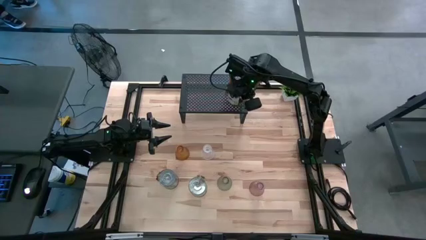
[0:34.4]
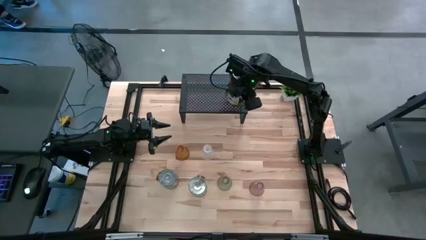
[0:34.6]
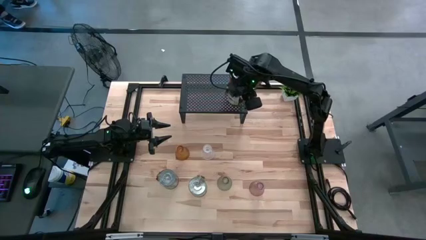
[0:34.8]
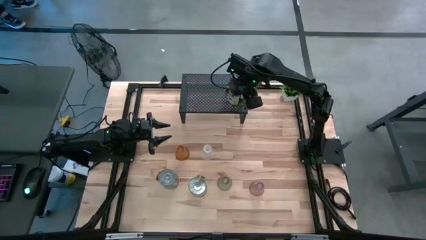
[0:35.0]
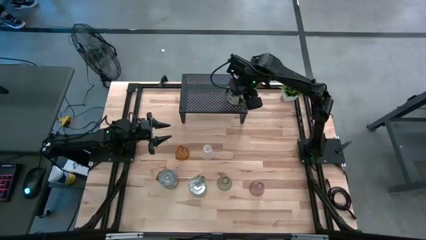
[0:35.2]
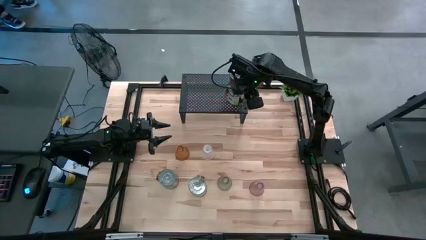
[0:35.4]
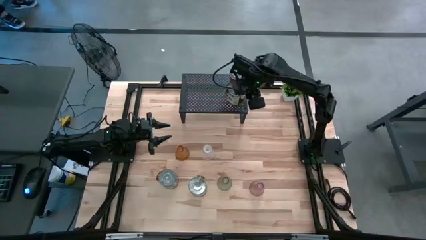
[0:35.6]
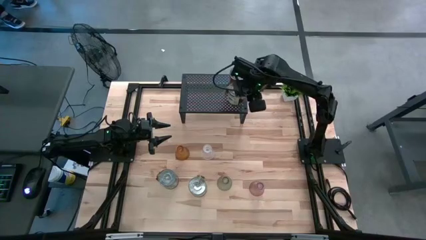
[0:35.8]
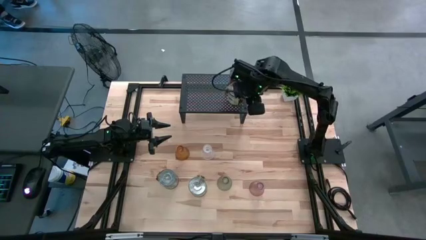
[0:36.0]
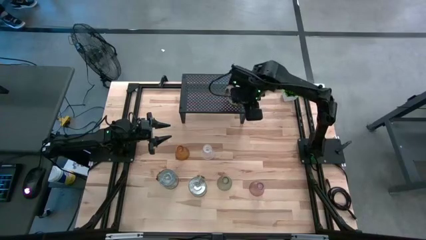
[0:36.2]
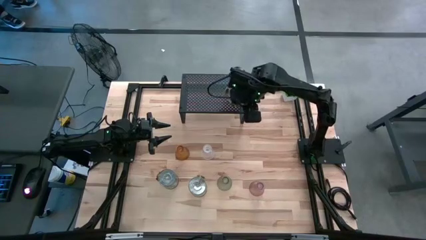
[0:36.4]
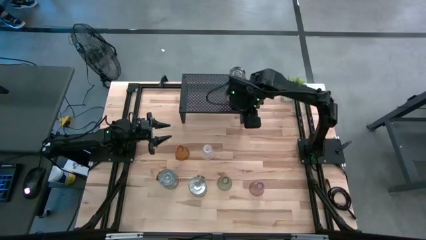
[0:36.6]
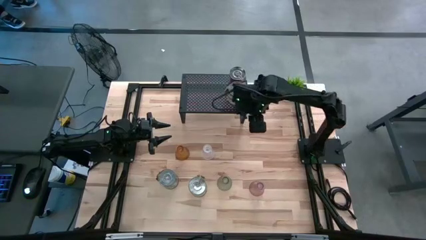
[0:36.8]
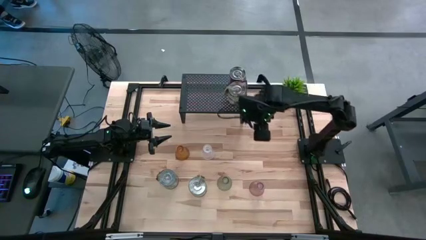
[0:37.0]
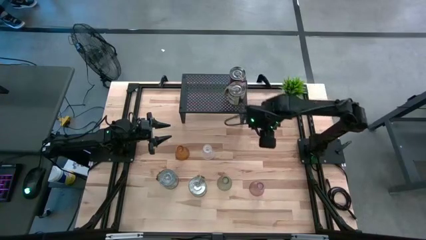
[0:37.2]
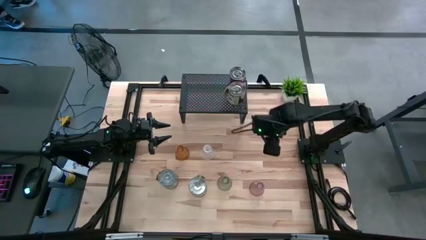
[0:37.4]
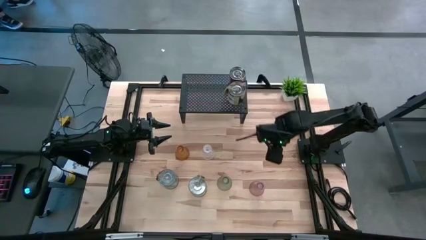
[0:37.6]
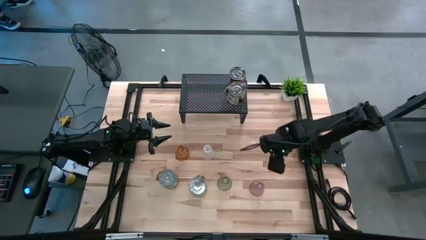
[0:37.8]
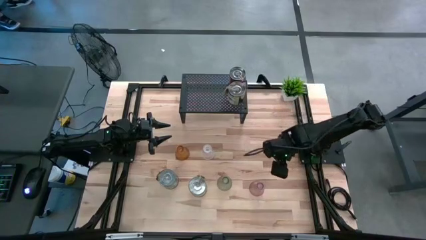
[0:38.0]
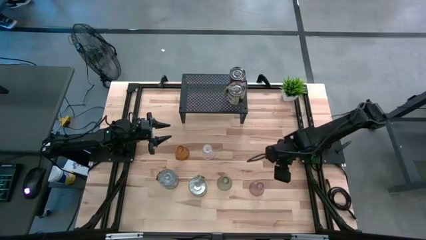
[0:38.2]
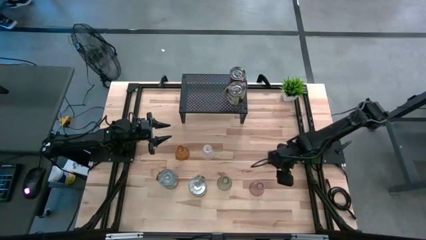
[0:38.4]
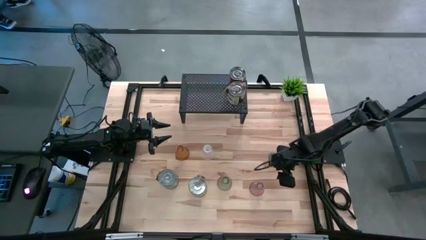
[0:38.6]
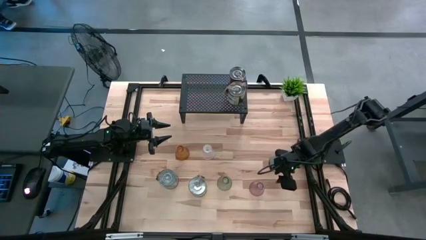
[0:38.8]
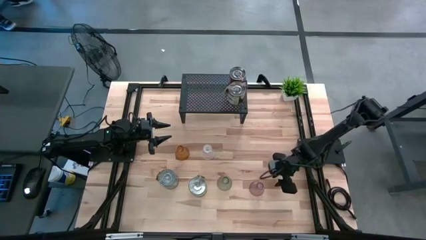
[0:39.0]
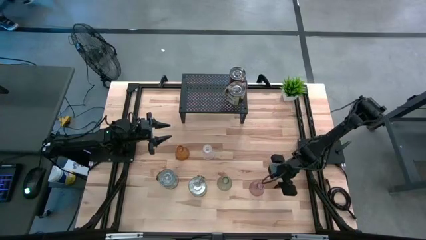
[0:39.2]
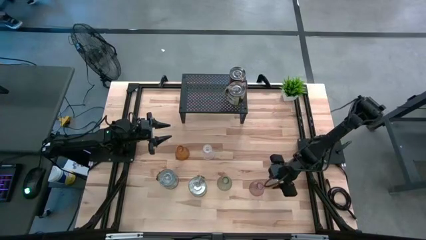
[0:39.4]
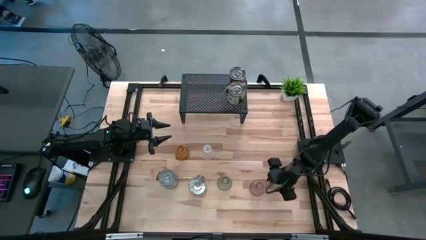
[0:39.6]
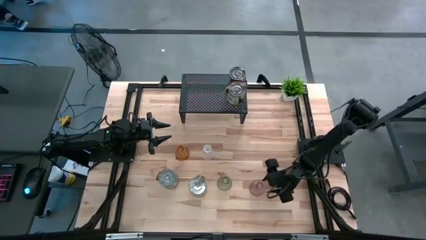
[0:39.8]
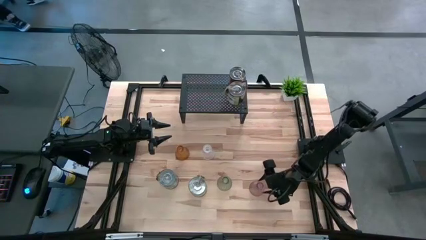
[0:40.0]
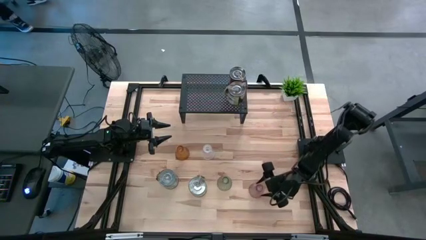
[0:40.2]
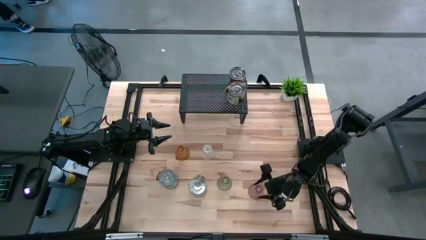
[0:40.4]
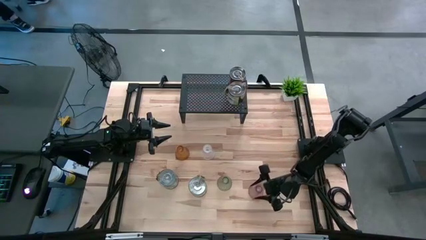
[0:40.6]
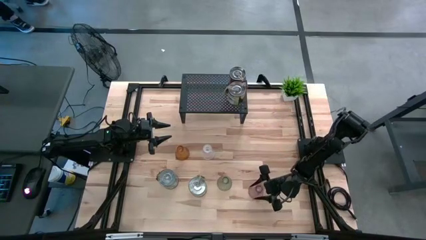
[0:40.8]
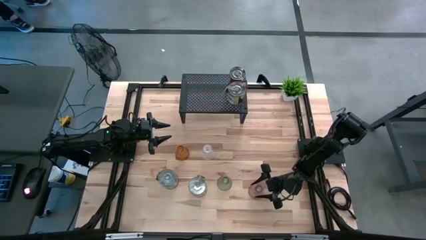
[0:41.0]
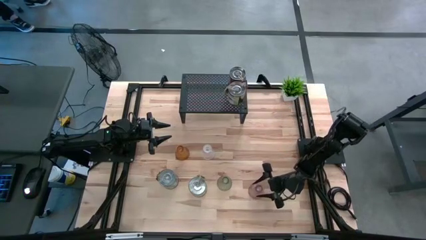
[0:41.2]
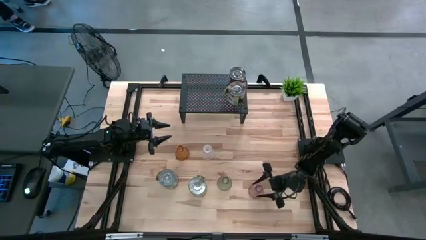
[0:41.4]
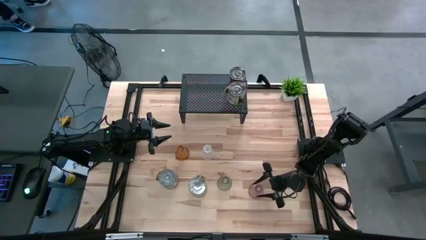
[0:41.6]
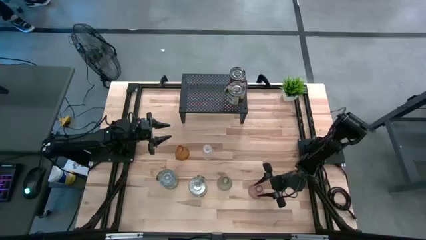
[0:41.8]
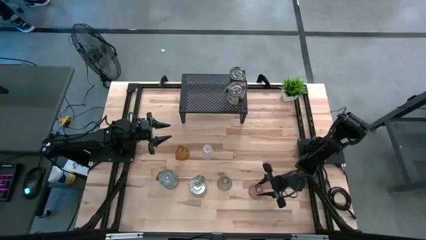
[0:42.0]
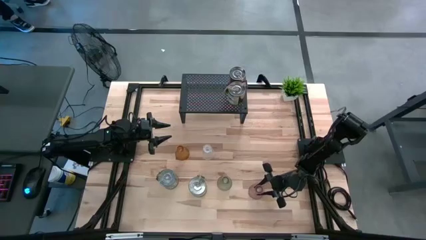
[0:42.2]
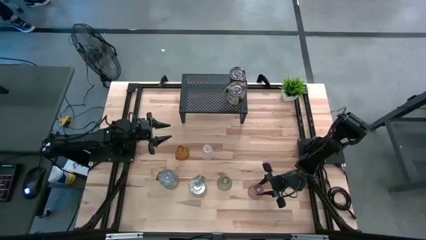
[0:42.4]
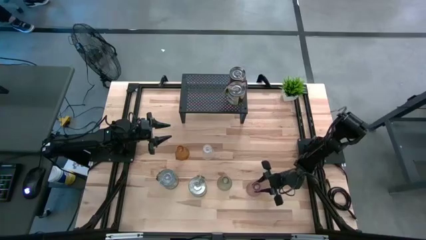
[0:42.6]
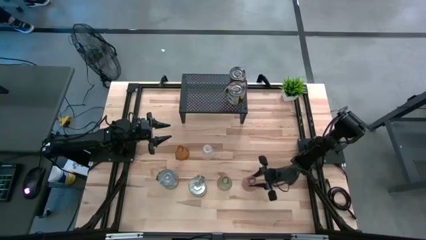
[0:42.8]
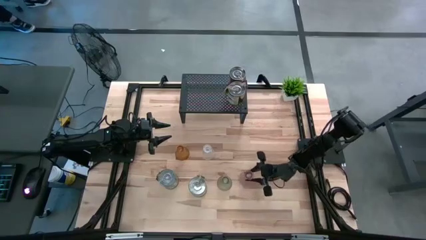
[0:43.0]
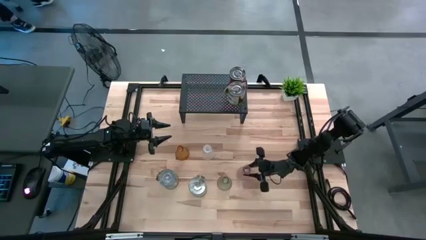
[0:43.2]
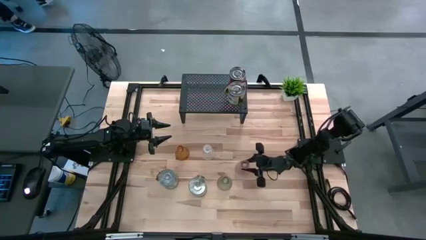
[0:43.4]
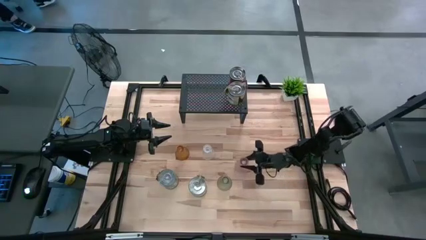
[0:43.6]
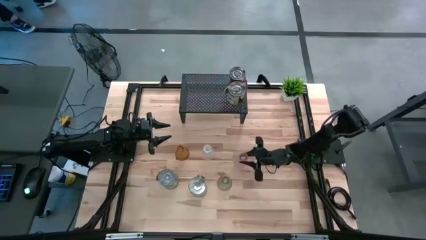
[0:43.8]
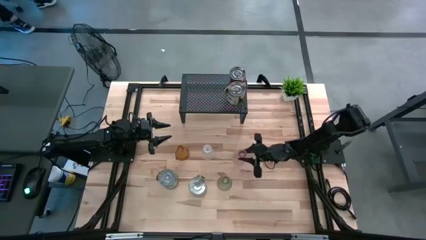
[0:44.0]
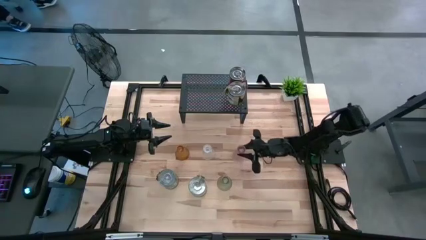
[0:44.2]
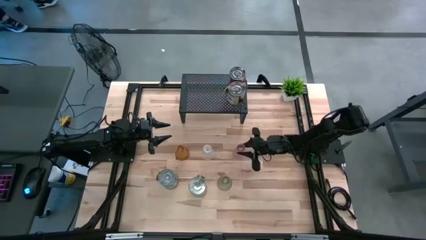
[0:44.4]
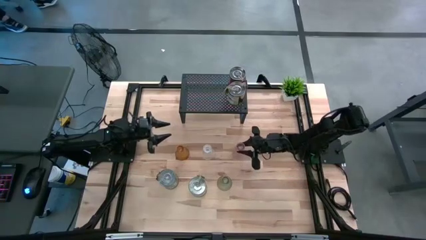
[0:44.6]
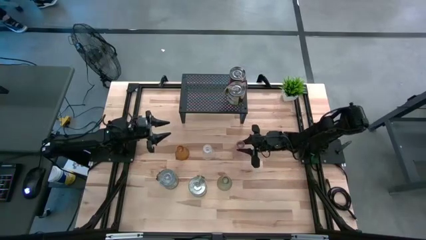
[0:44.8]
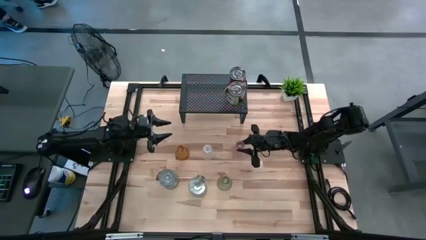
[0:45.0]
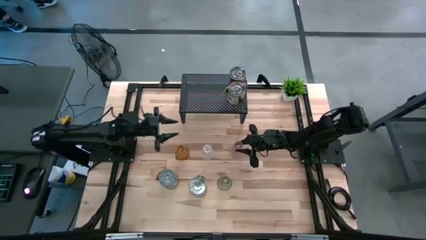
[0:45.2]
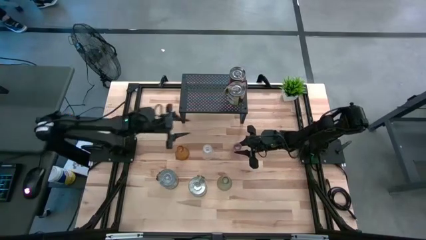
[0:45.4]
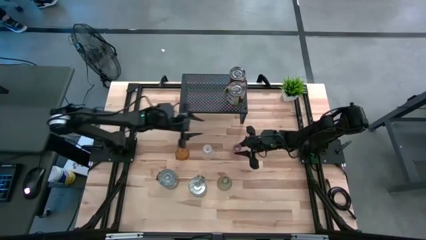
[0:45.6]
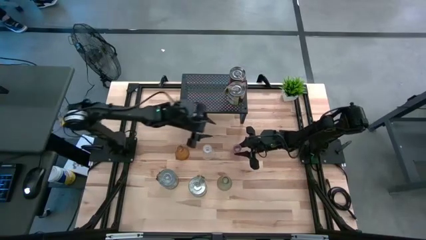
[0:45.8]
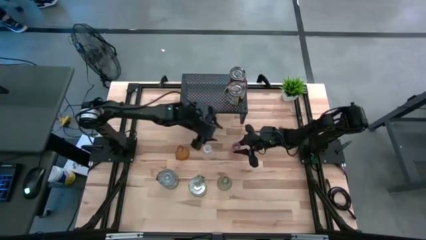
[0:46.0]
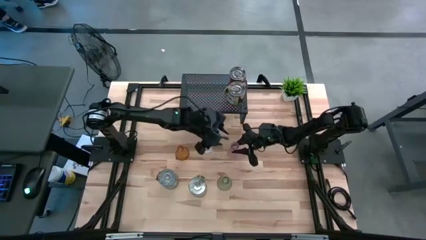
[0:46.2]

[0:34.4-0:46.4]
Task: Pick & Place candle stick holders
Put the pink glass candlestick on the shelf
